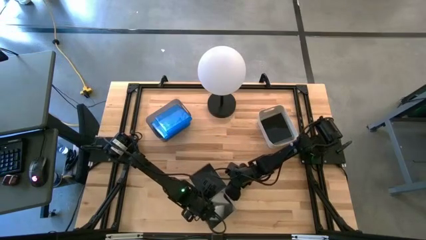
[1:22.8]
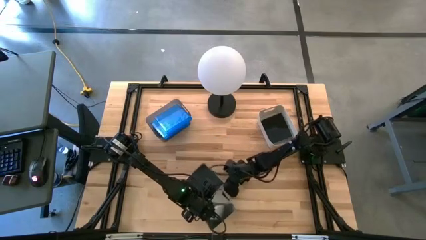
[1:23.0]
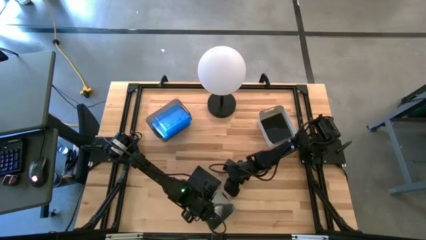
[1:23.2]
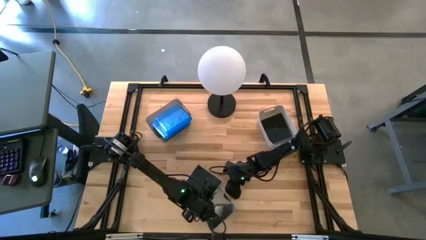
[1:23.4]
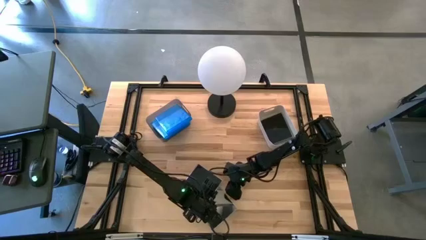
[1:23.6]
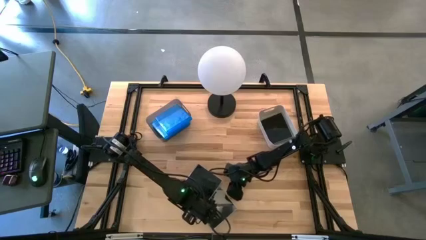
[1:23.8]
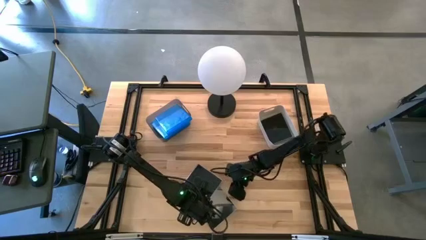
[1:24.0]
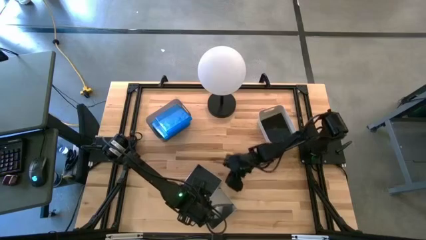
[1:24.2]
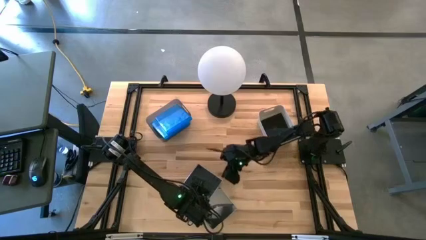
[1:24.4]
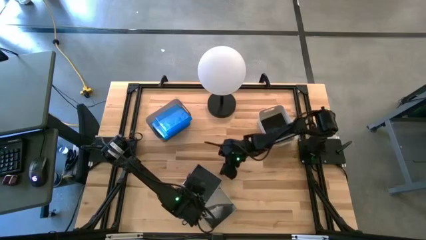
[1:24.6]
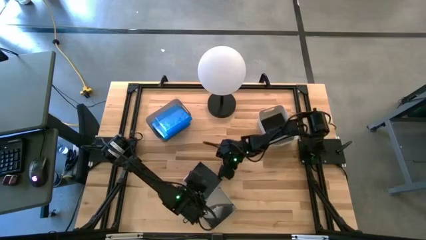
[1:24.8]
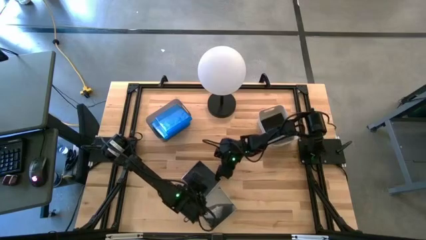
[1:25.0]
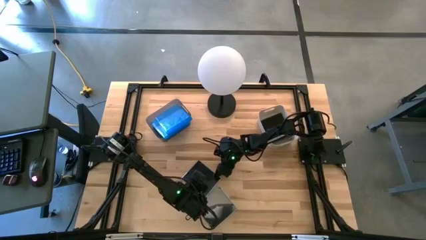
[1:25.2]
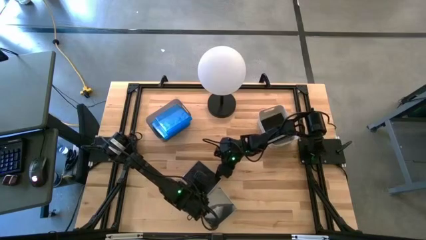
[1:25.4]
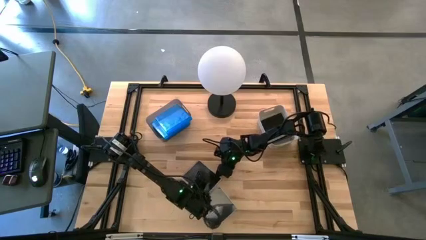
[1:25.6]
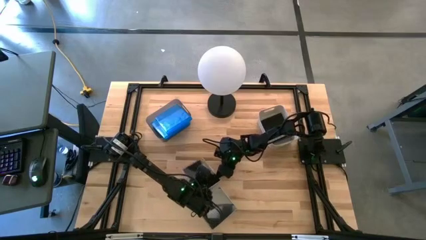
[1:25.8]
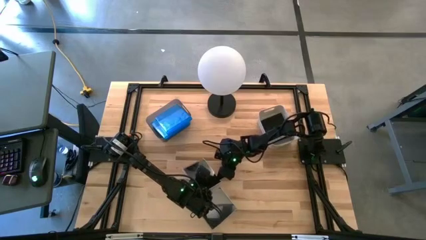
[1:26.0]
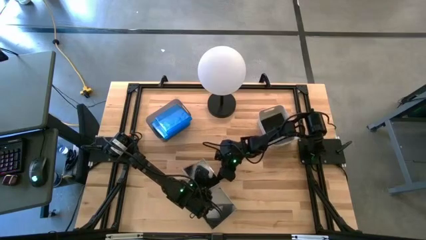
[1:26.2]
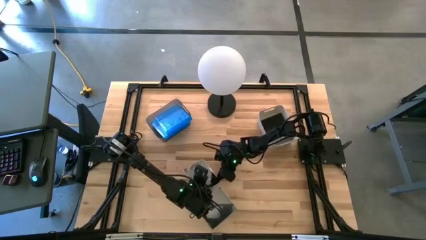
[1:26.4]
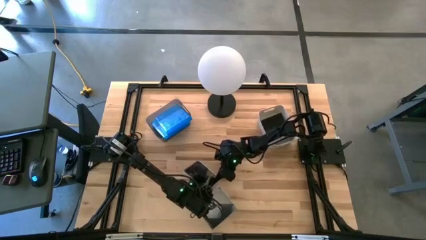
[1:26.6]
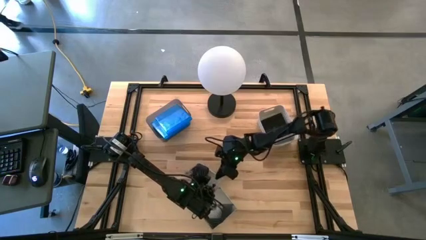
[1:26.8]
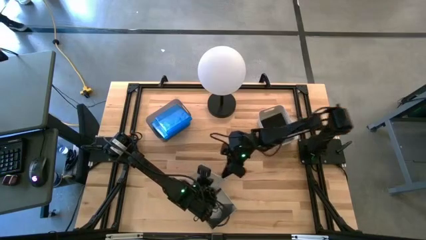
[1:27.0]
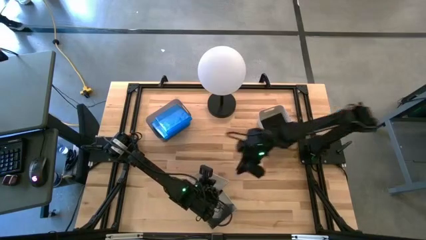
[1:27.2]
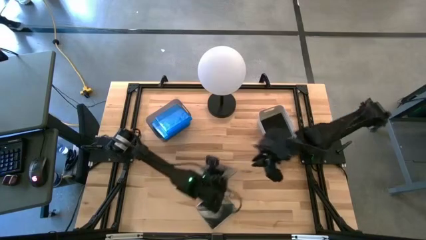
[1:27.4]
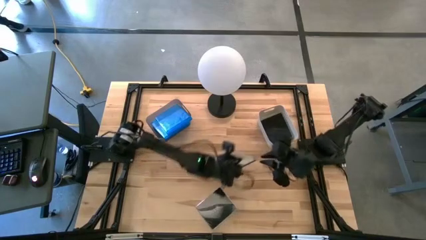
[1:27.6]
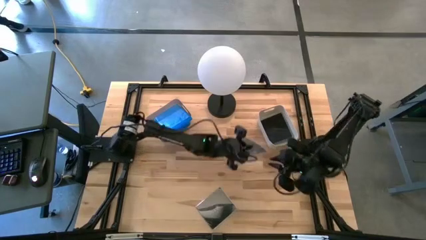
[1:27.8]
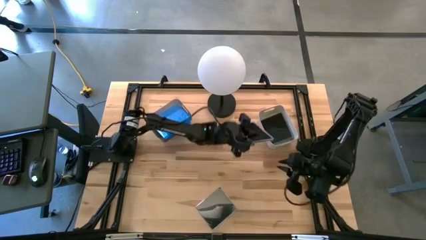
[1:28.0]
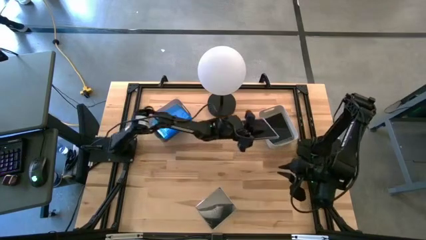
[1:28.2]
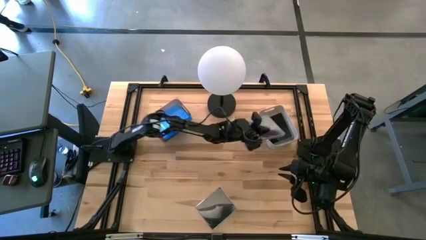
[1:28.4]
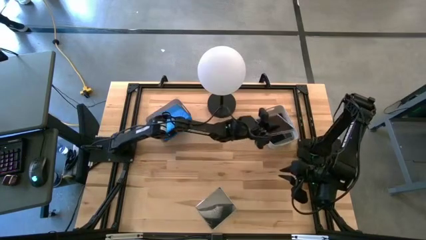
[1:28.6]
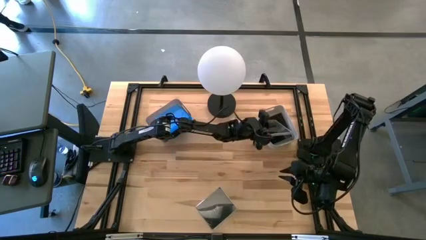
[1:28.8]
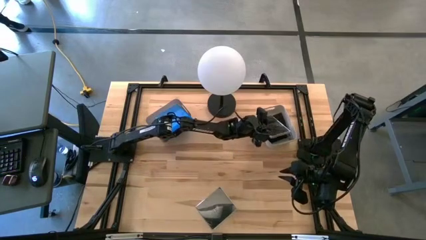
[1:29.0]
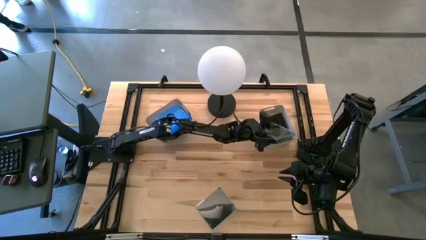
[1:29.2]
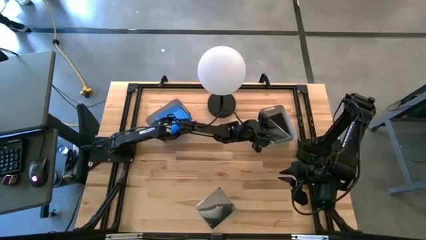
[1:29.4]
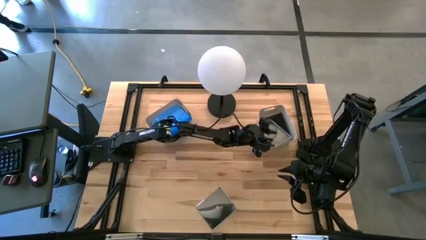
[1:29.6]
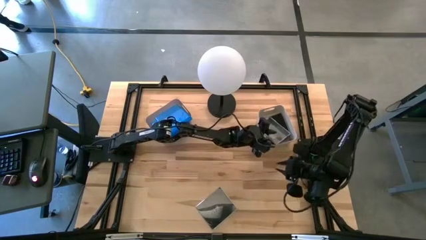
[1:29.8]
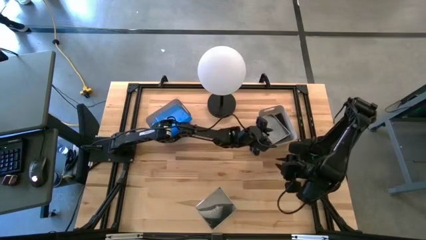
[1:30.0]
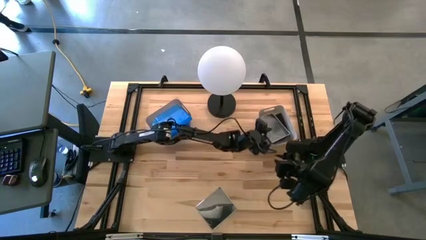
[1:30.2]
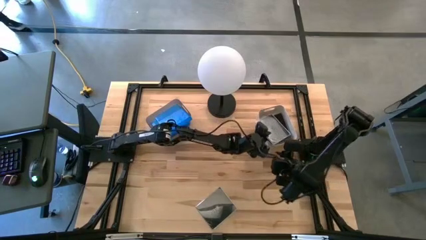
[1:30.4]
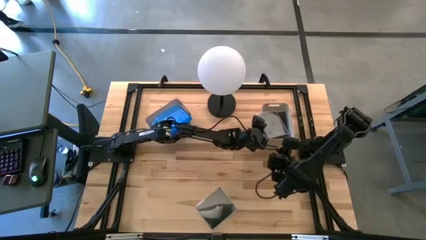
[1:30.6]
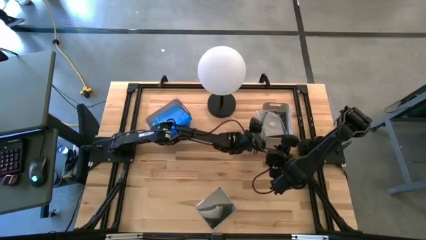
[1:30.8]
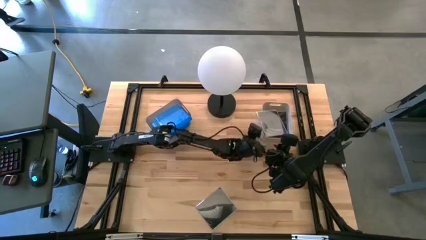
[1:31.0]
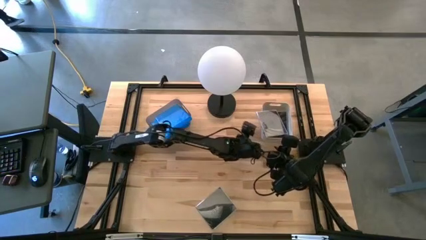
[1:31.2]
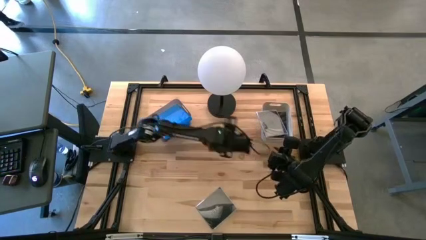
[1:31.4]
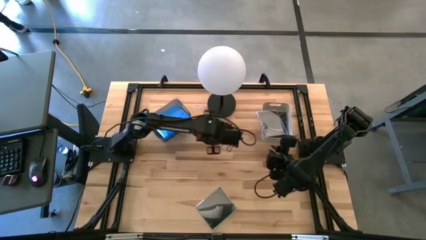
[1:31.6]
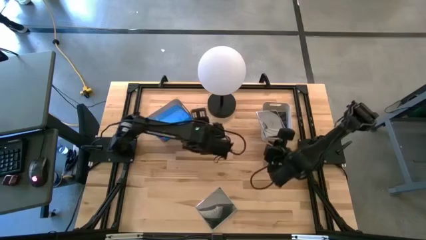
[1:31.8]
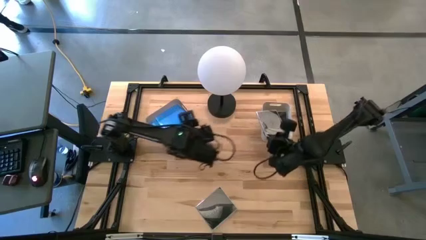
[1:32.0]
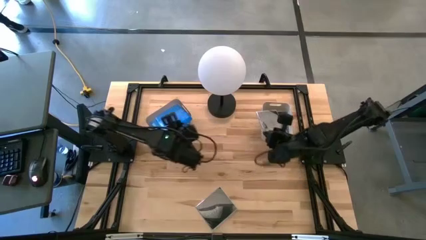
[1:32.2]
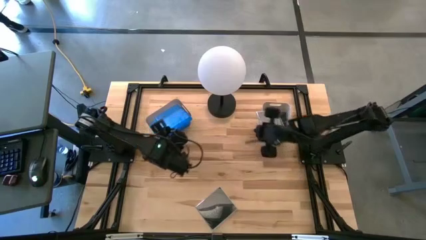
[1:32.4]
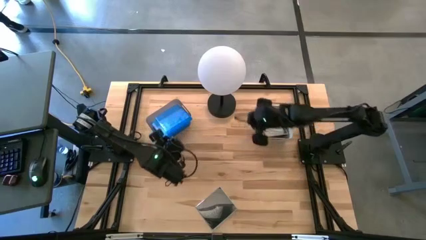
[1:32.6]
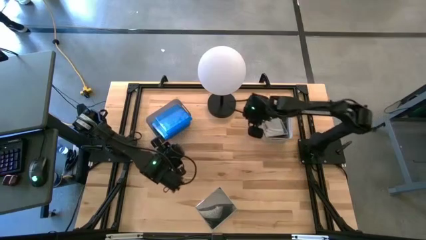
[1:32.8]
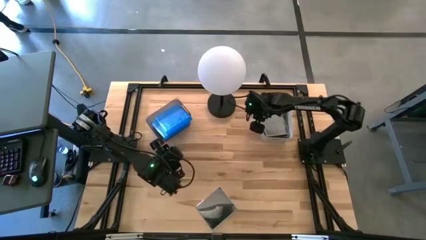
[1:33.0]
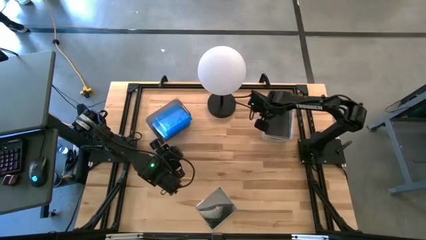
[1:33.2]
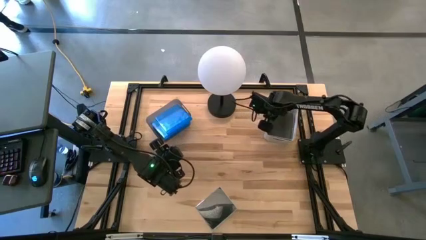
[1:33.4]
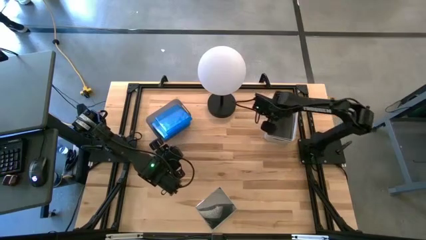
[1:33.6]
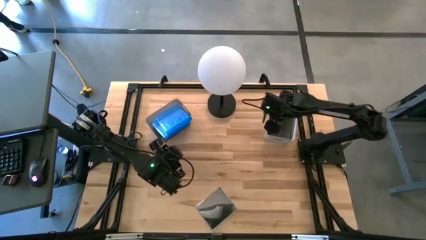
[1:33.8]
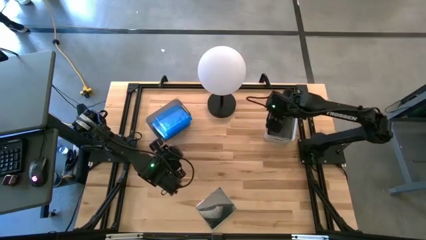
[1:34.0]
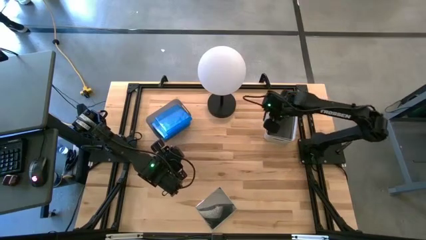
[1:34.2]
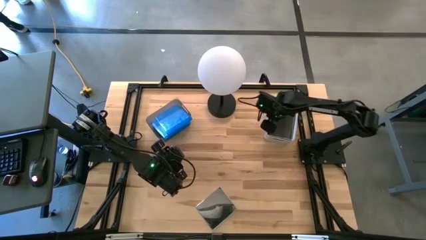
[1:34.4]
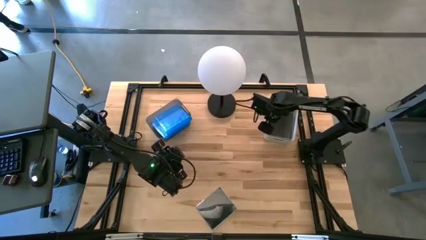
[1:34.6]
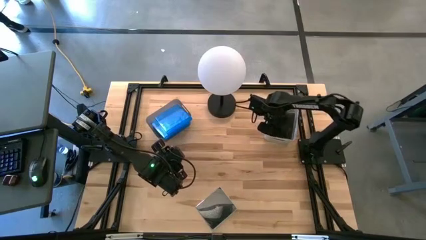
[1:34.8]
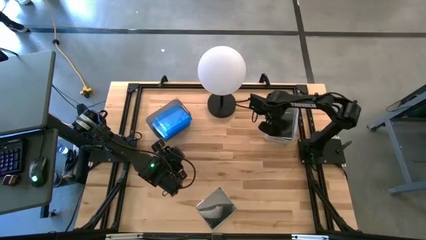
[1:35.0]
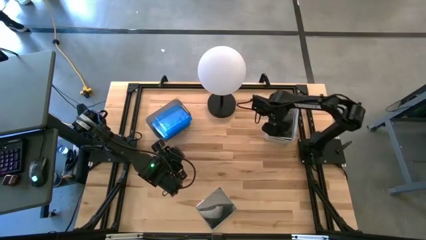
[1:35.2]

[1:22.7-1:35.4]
Task: Pick & place jewel cases by type
Put the top black CD case into the gray bin

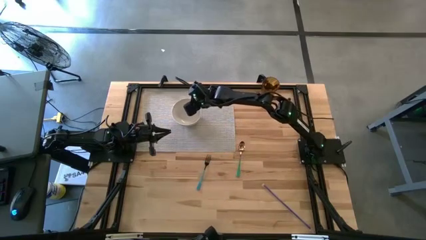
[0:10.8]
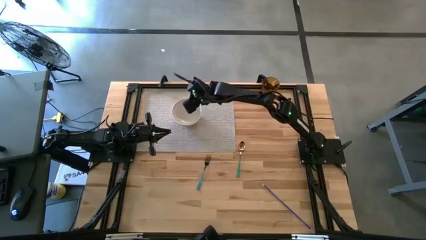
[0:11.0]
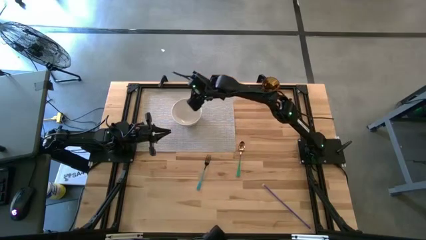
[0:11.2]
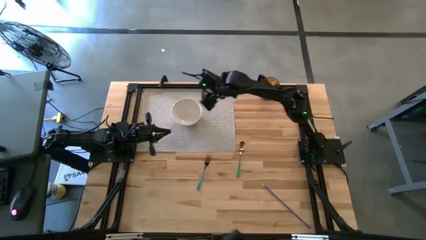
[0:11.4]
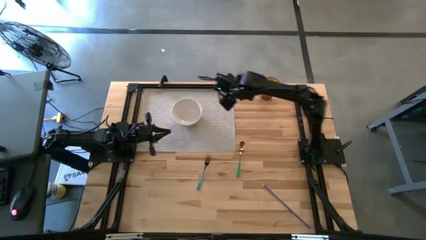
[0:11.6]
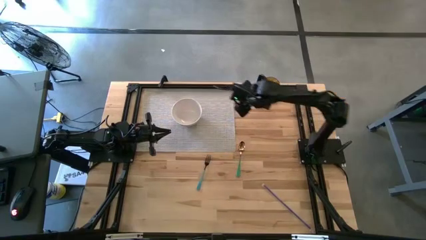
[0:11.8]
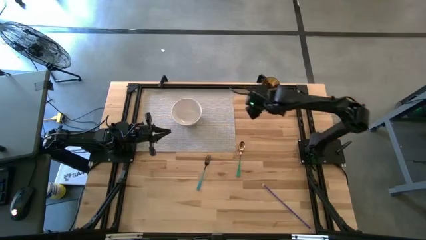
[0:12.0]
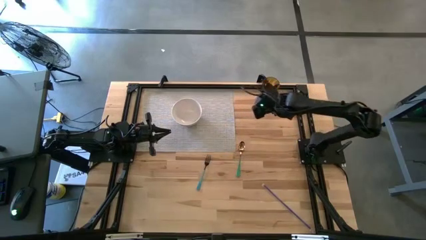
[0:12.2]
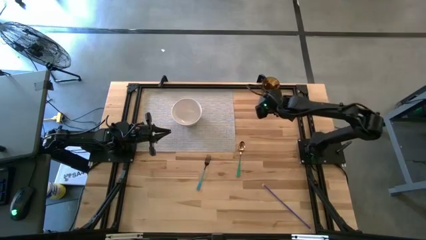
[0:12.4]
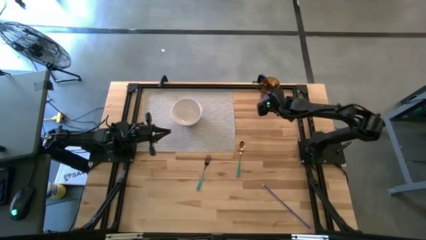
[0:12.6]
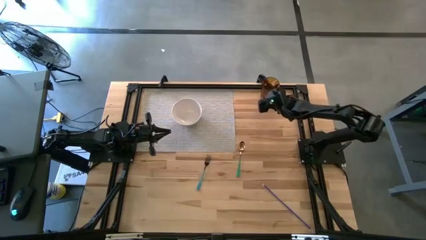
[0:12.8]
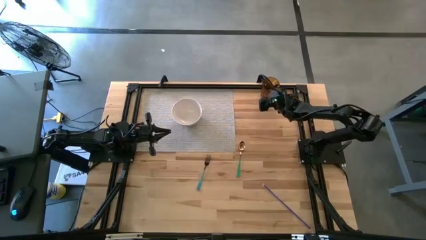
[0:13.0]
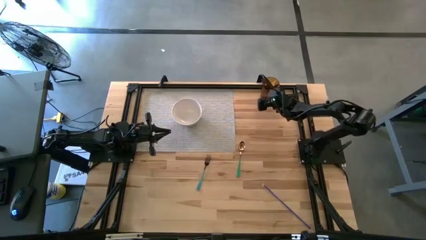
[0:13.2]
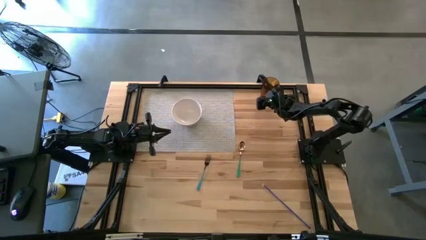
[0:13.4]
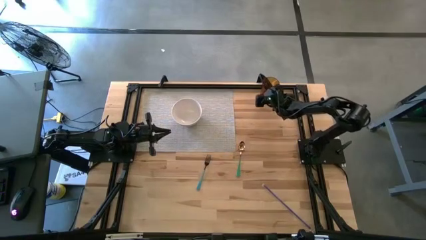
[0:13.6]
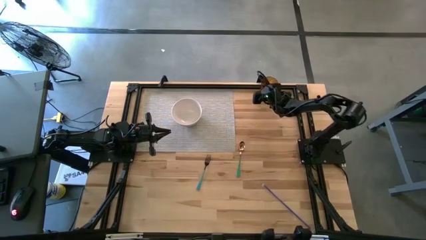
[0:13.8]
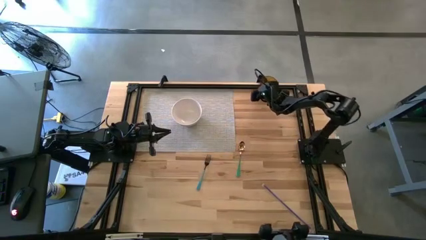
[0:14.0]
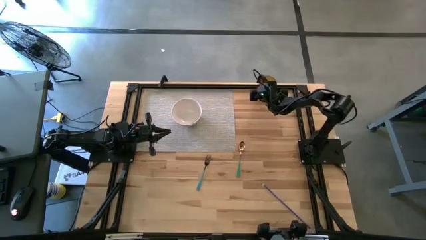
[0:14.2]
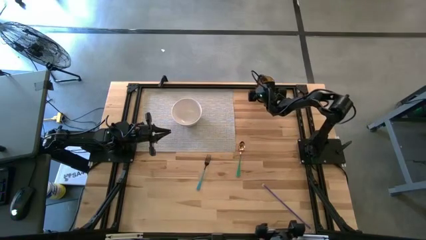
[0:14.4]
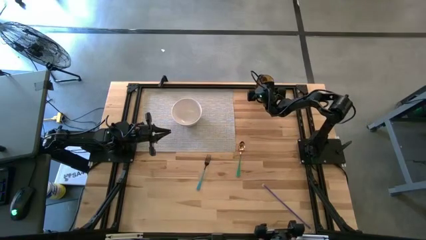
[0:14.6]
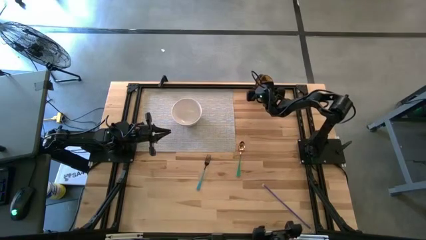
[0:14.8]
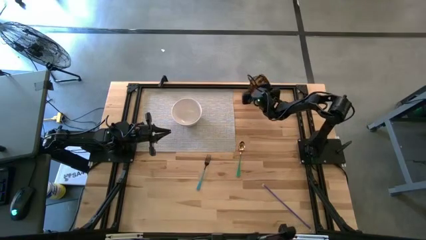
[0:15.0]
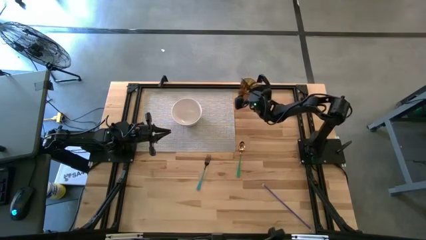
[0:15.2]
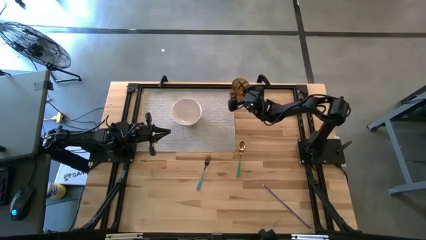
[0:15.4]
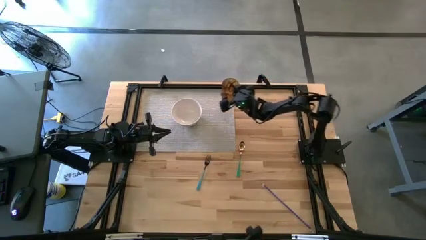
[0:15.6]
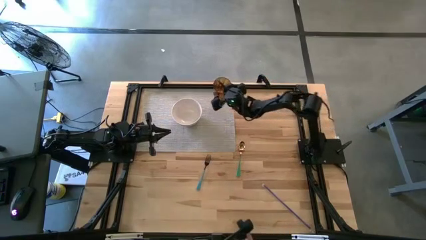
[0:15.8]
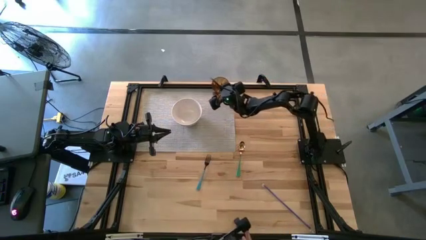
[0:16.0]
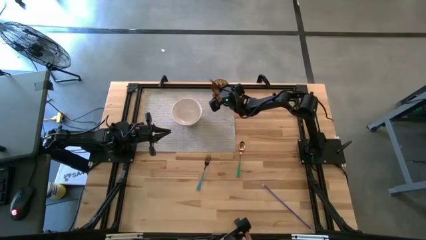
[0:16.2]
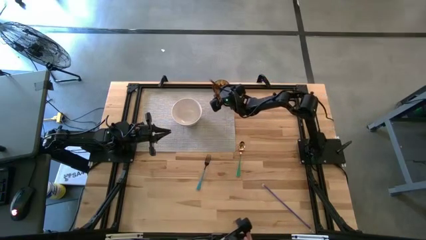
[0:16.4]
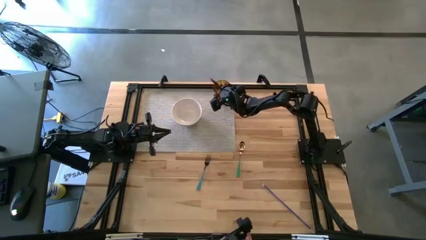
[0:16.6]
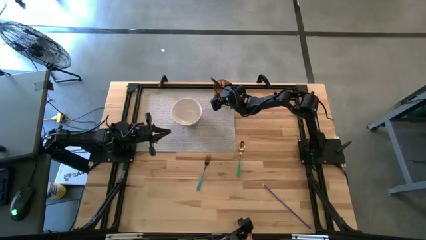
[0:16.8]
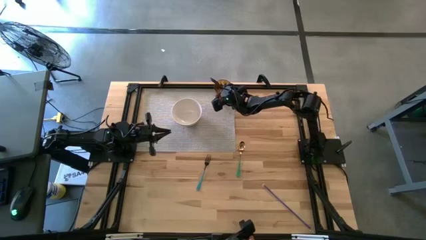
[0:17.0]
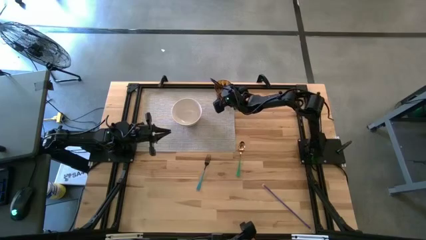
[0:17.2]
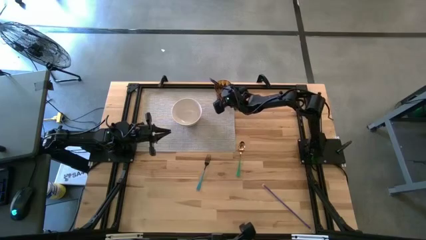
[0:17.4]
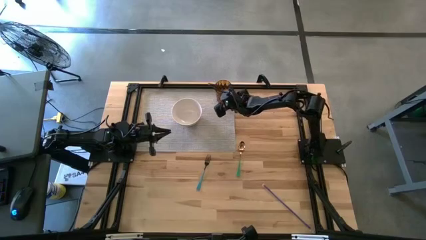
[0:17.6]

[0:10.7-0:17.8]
Task: Pick & Place Utensil
Put the orange cup to the top right of the white bowl on the gray mat
